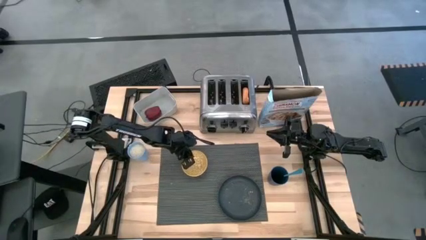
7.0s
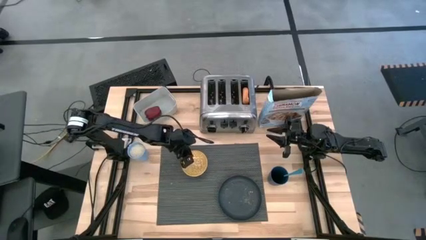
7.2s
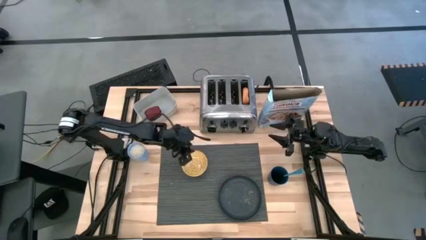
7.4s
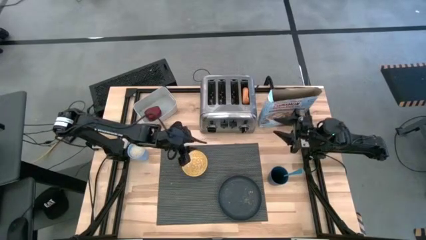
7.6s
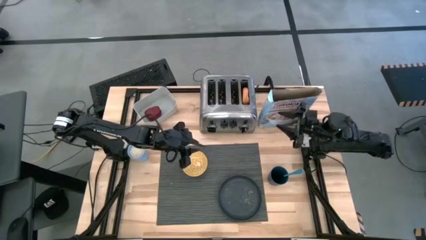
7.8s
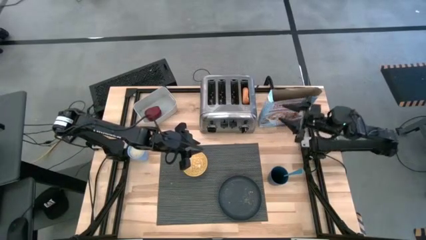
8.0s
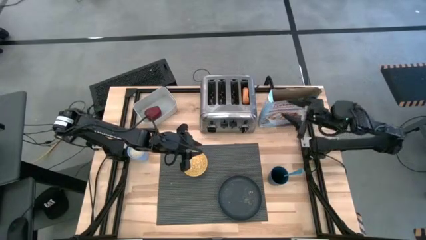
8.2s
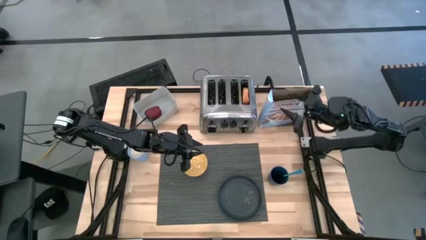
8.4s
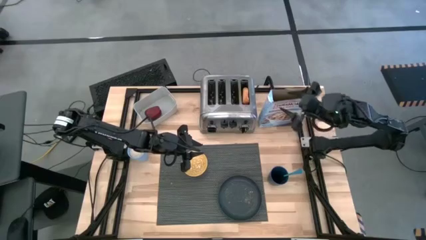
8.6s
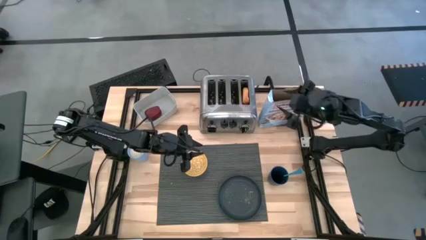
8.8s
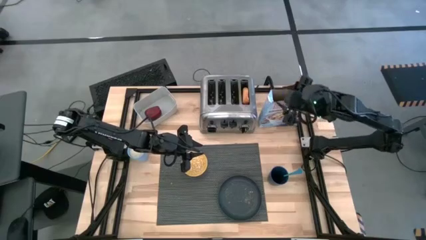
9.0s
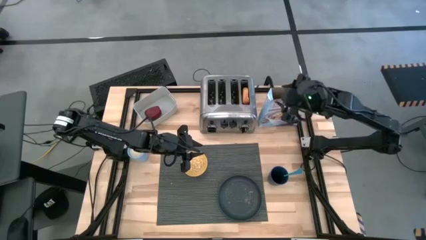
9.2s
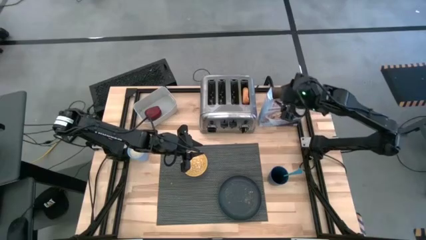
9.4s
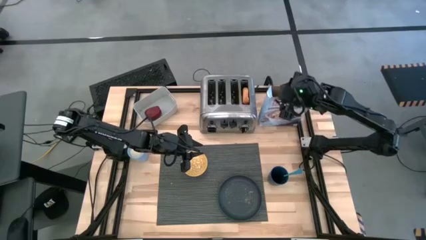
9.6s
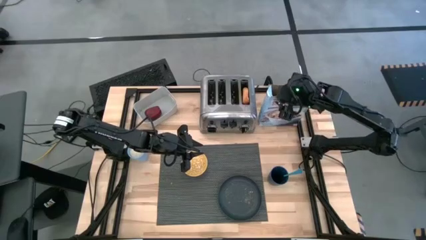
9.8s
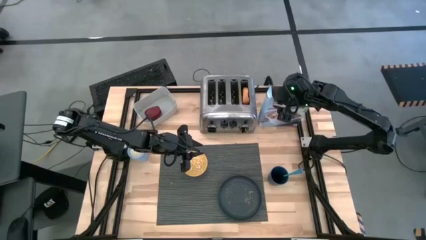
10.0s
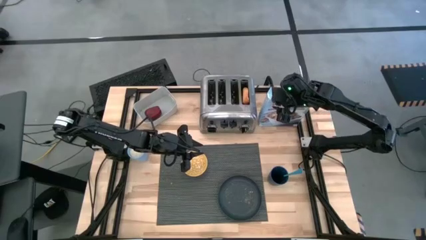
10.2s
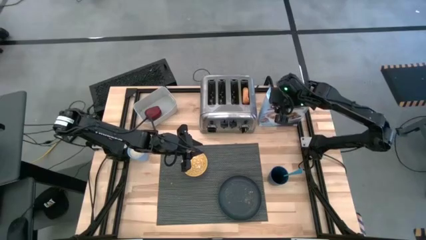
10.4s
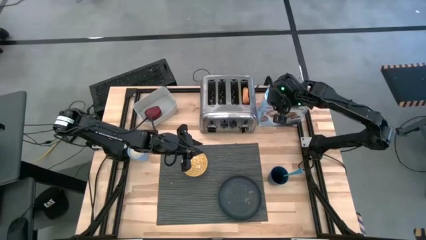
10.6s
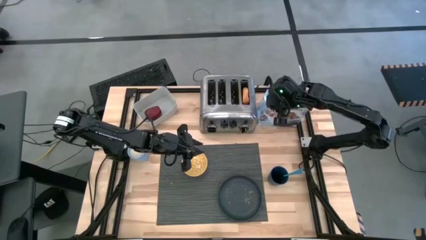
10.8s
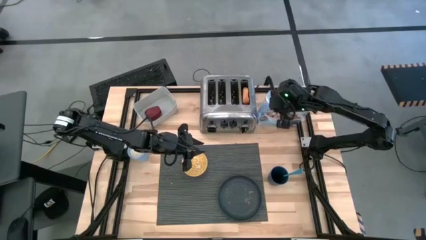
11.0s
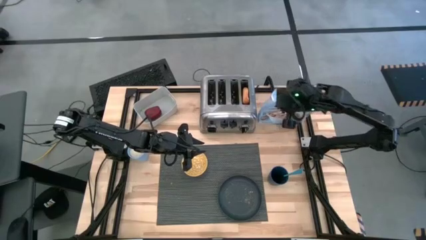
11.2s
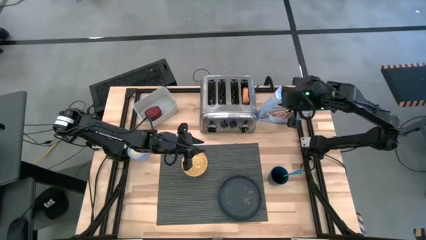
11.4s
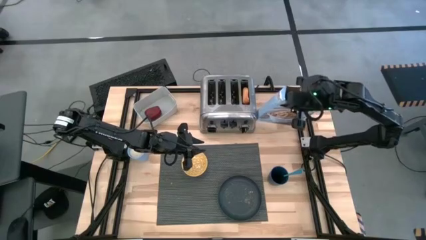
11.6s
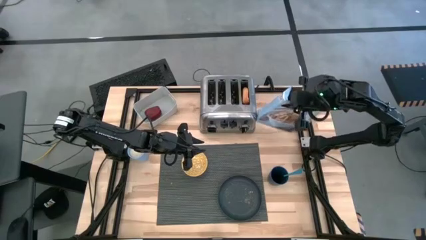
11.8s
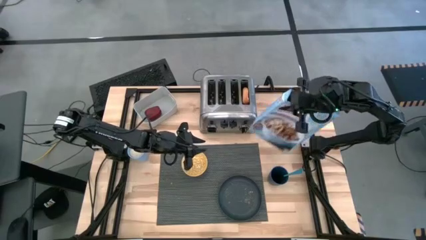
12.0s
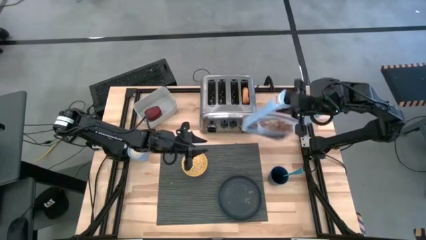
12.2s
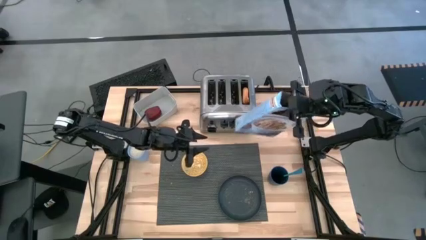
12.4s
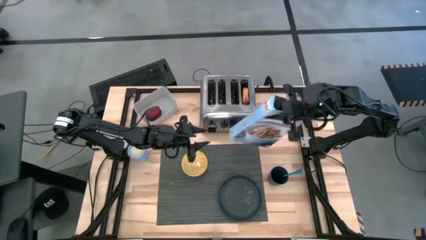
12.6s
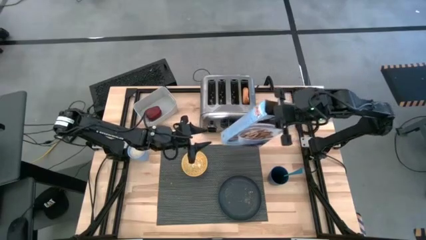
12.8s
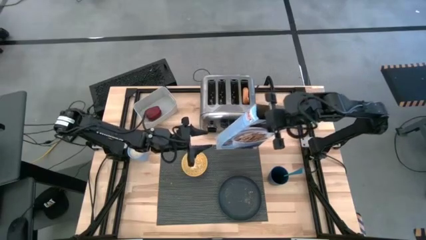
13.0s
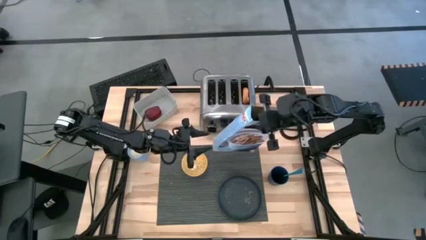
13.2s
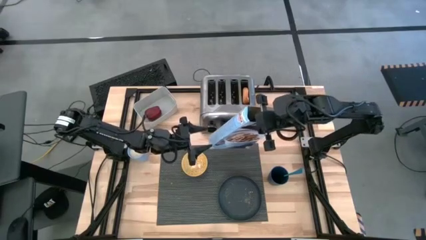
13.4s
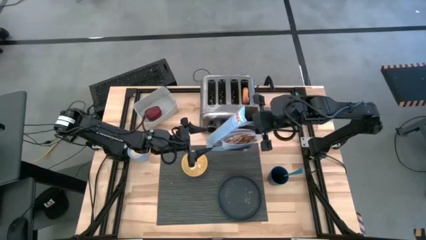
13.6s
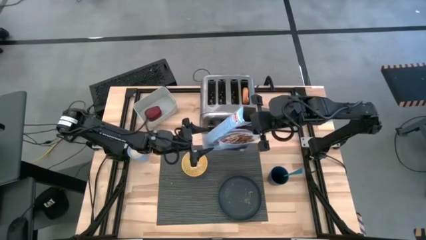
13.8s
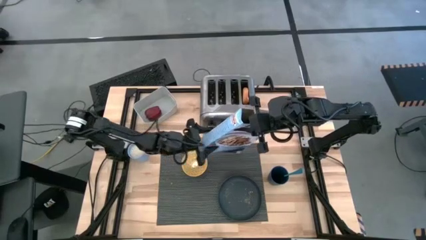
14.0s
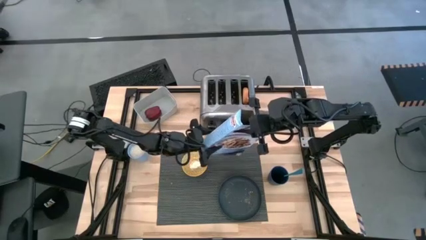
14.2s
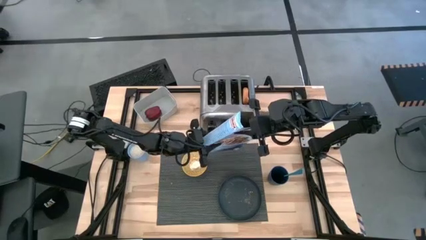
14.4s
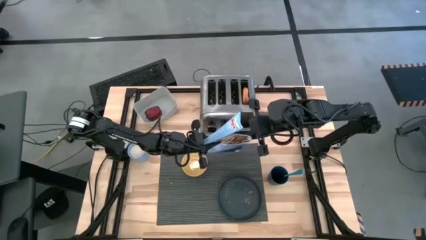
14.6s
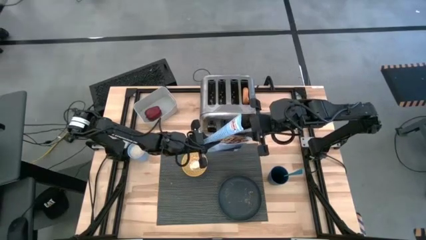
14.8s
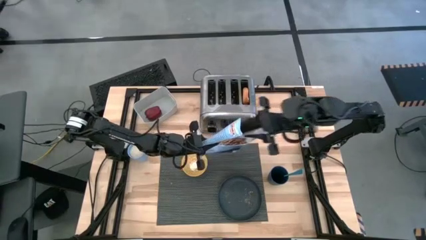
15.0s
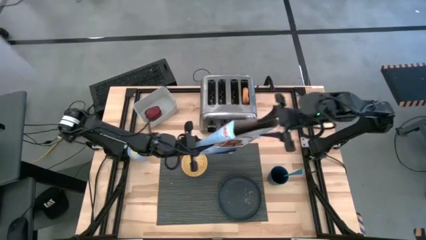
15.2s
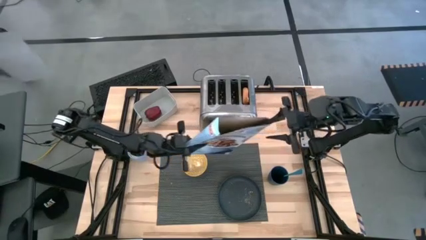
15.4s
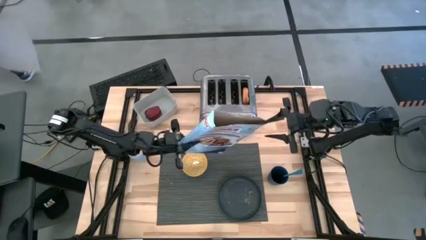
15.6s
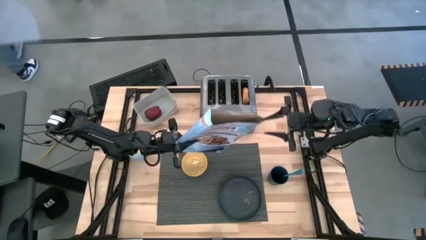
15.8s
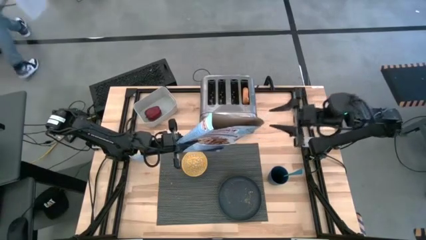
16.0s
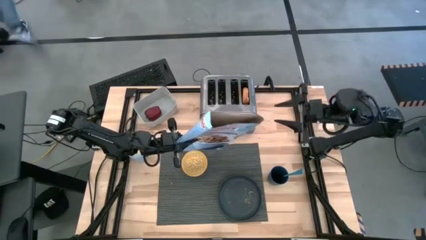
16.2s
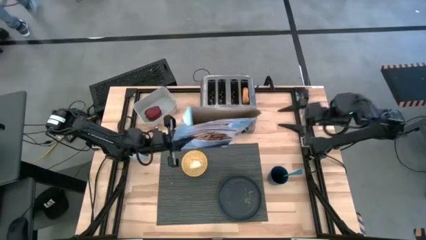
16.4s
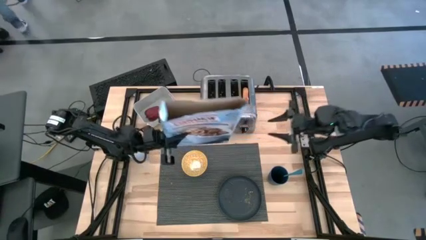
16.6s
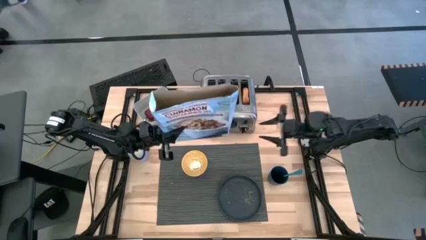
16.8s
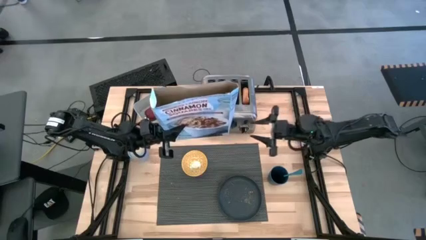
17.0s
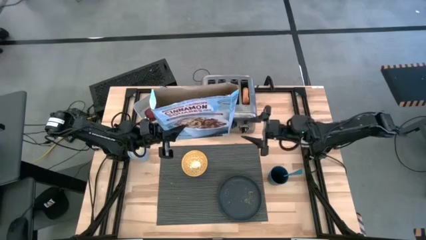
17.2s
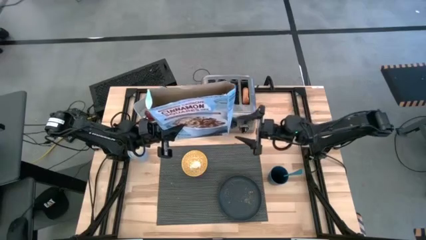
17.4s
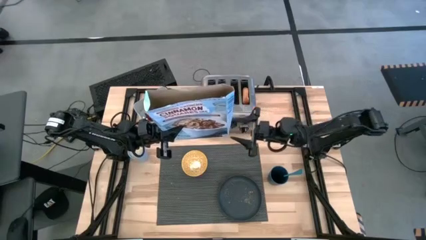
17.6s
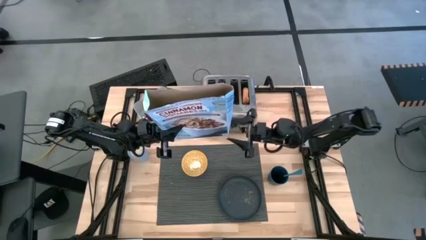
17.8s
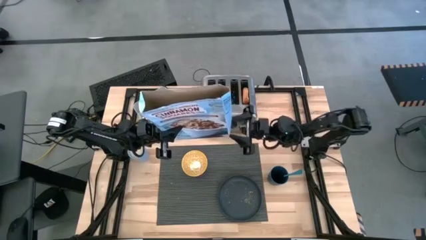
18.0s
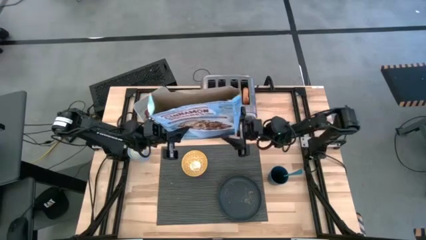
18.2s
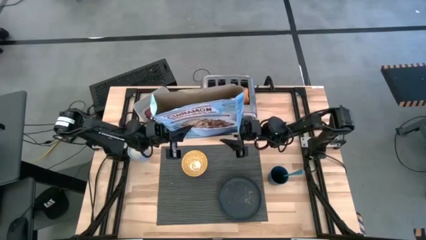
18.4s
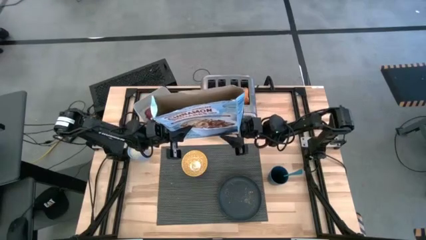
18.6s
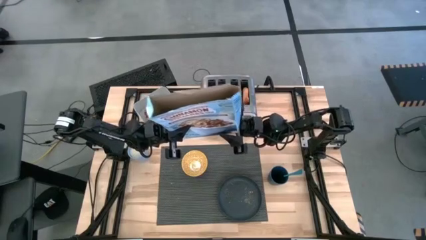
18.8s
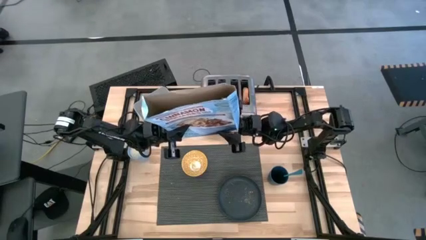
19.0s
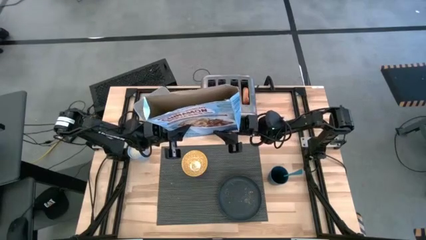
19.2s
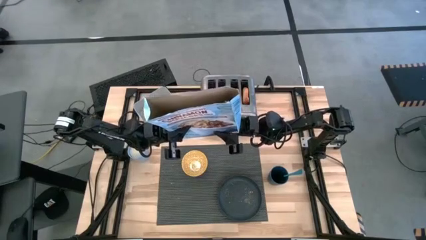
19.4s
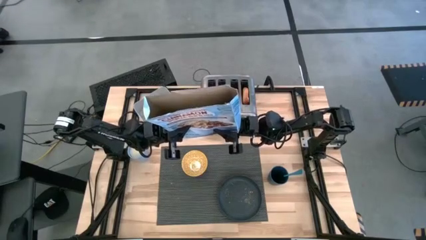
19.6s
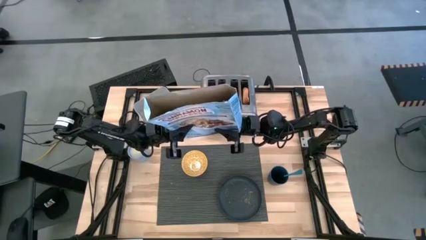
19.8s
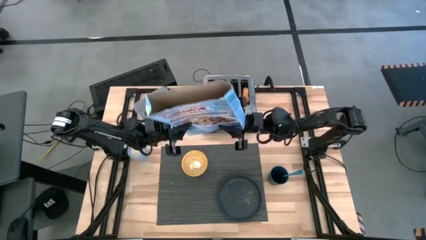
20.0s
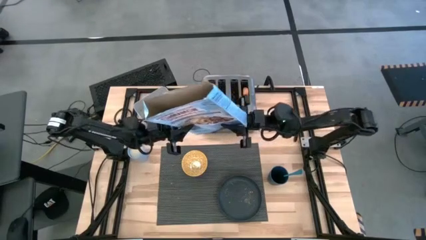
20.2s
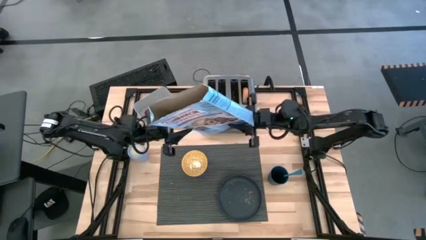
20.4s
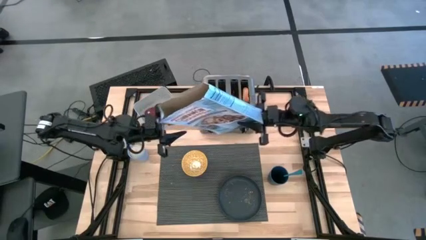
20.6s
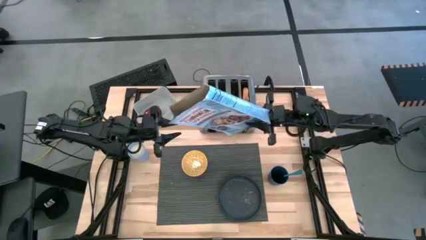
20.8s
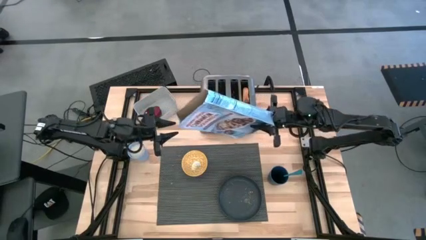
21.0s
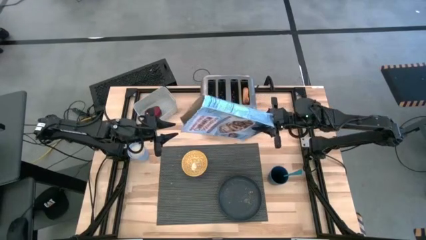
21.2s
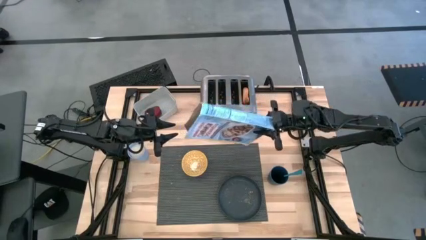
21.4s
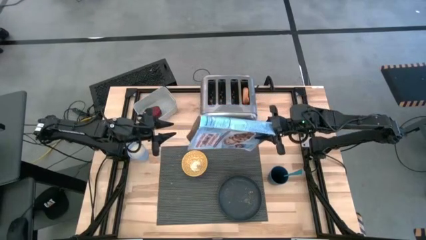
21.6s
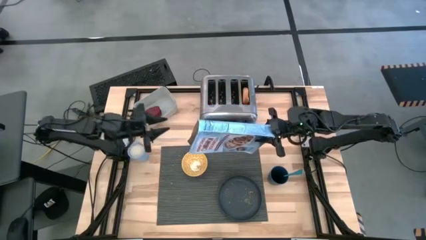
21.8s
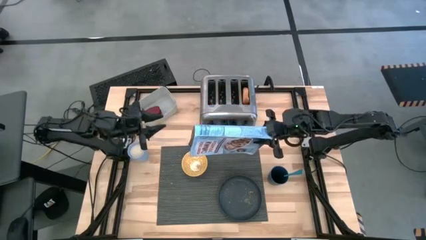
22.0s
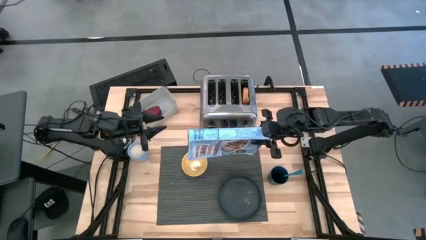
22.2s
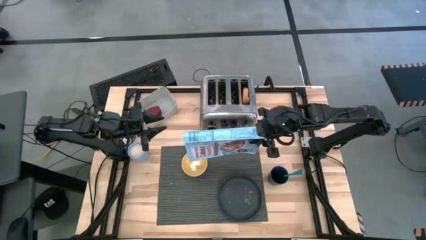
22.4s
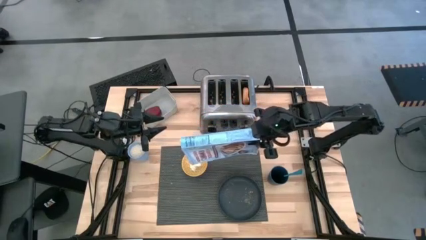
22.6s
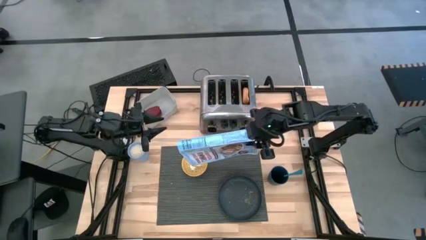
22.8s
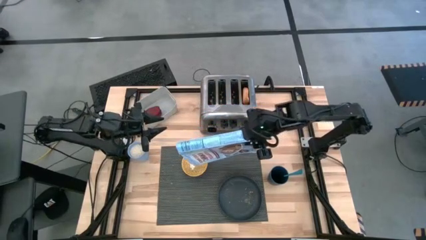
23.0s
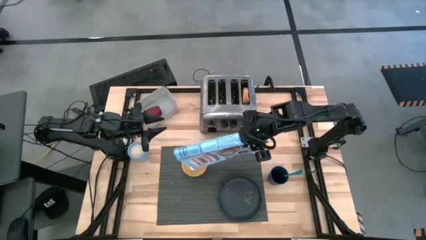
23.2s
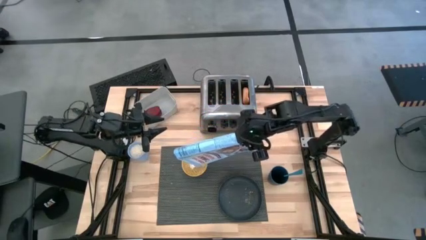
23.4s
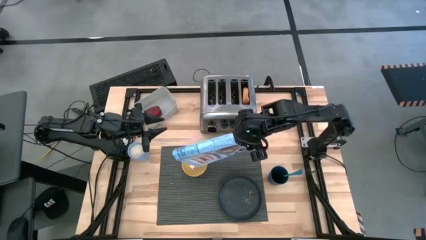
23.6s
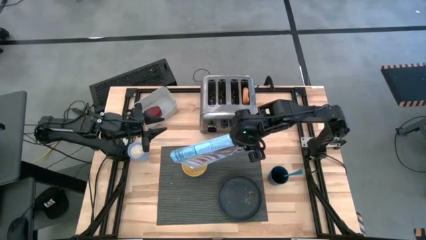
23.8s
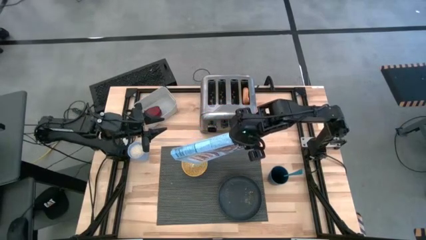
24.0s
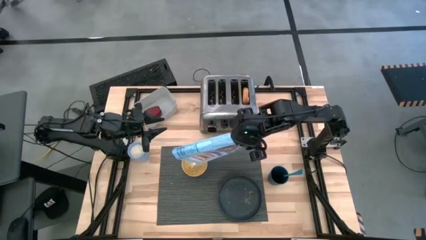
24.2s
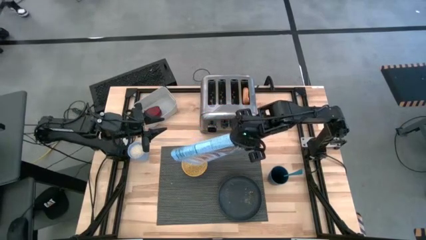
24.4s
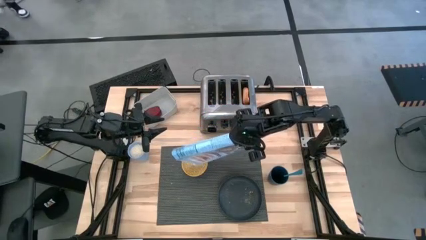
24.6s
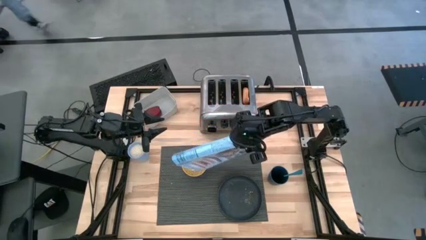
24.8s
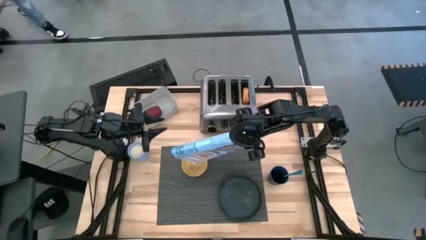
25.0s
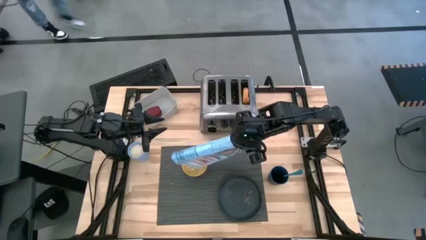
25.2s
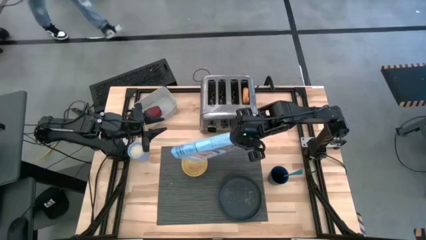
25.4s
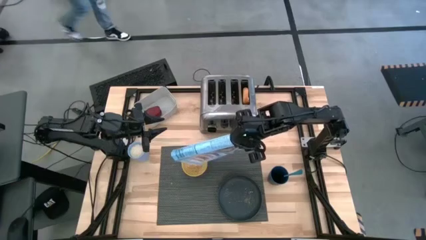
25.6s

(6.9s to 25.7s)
Task: Arrange a breakfast setting
Pour the cereal from the blue cereal box into the yellow bowl
